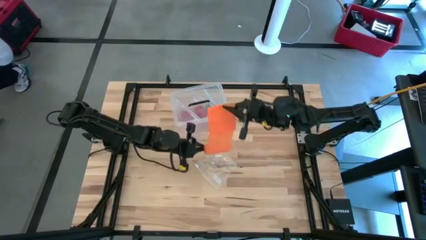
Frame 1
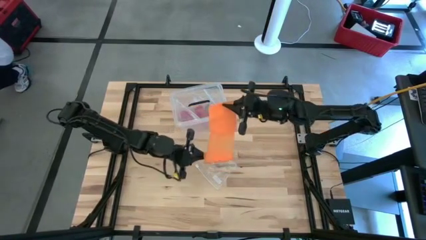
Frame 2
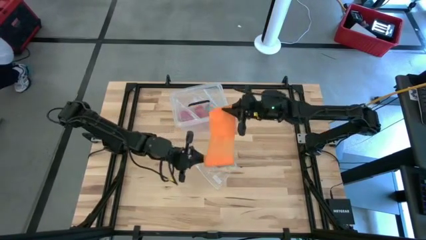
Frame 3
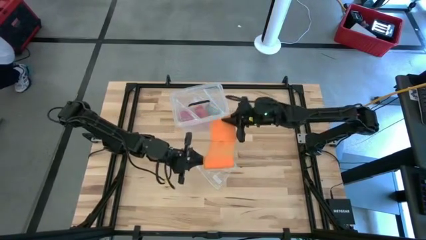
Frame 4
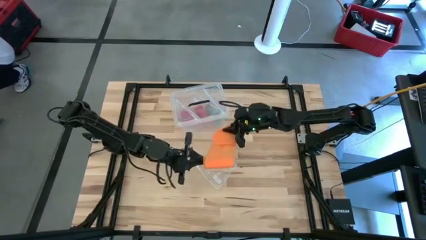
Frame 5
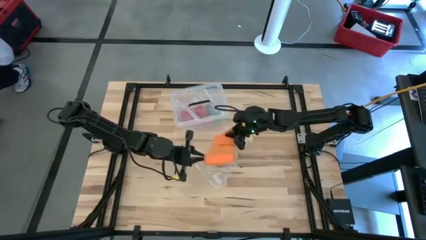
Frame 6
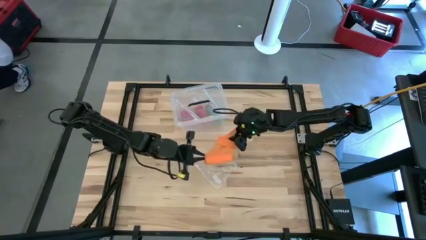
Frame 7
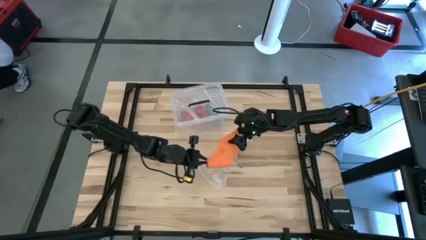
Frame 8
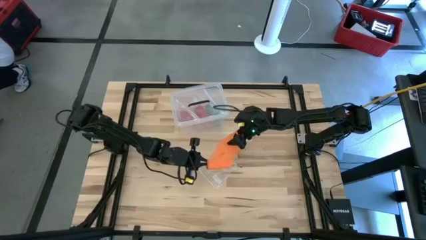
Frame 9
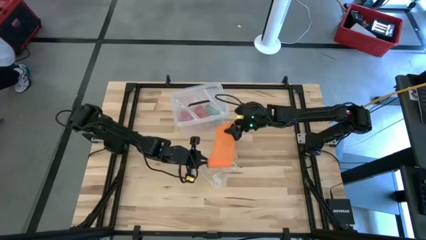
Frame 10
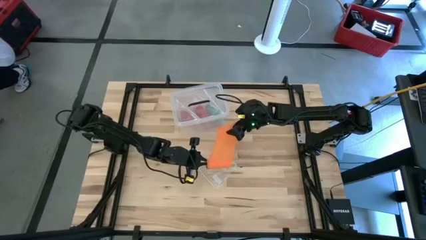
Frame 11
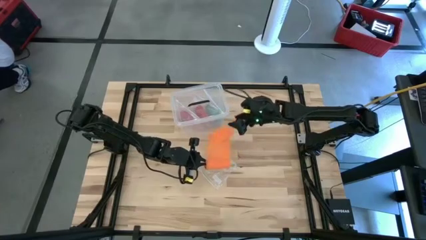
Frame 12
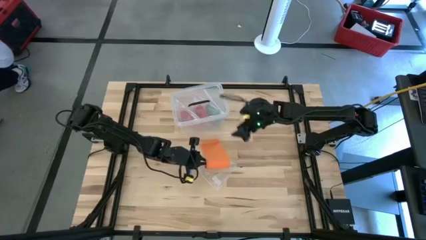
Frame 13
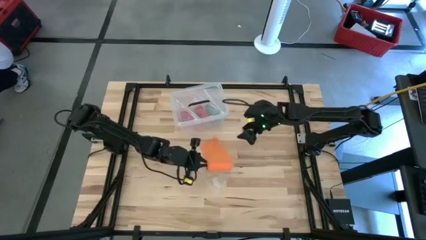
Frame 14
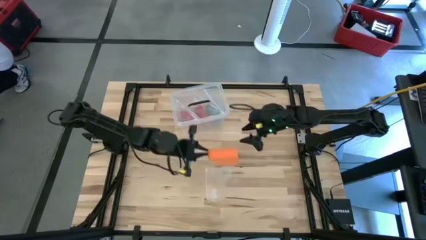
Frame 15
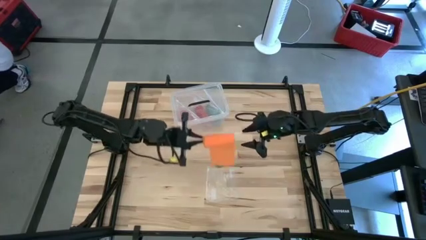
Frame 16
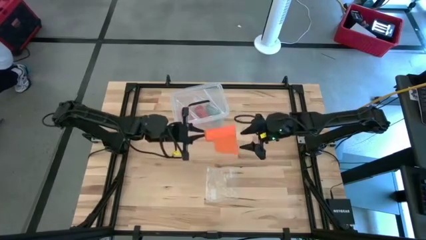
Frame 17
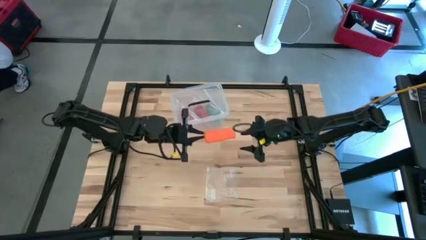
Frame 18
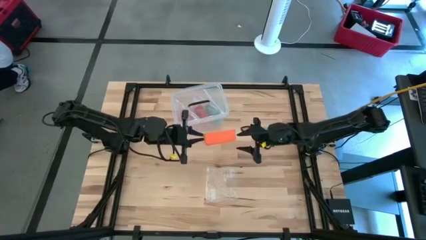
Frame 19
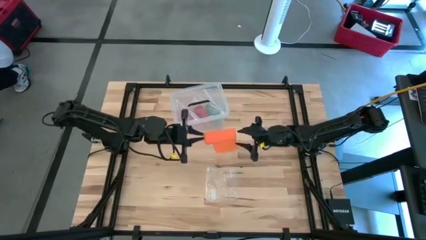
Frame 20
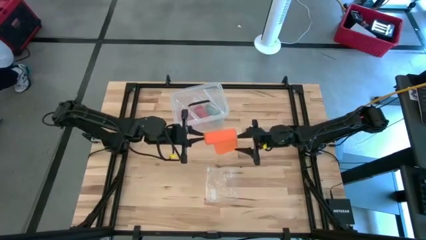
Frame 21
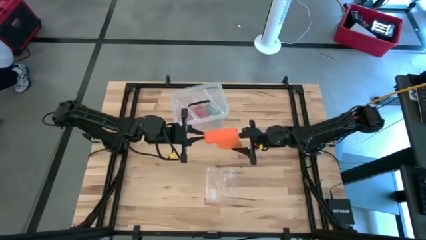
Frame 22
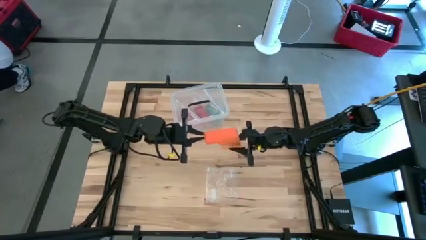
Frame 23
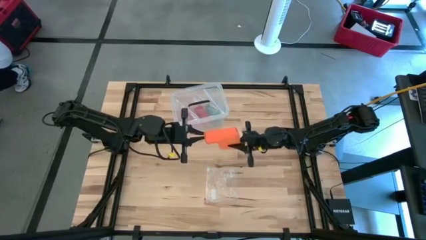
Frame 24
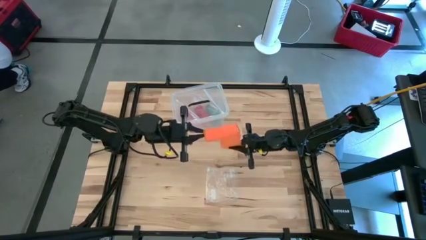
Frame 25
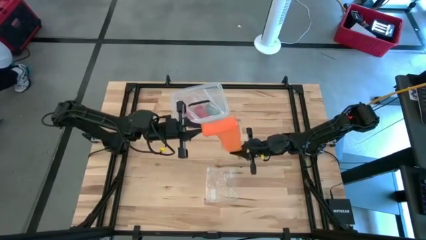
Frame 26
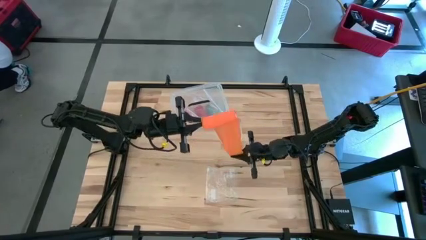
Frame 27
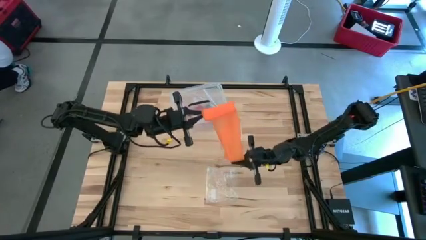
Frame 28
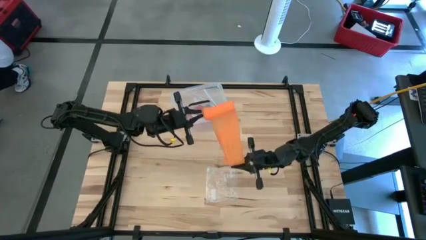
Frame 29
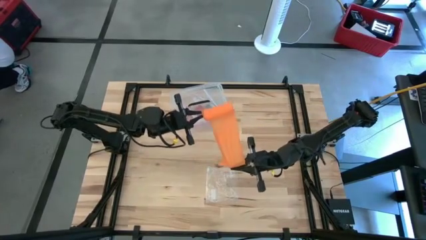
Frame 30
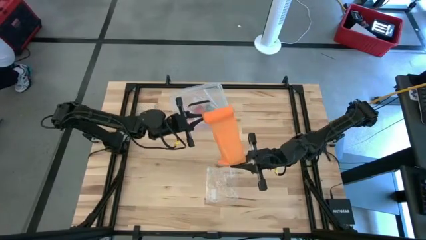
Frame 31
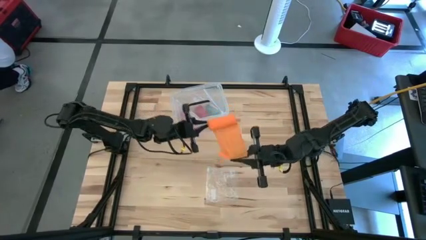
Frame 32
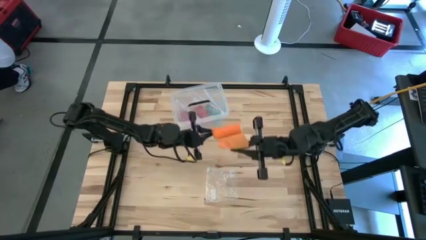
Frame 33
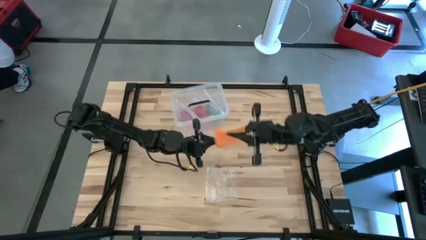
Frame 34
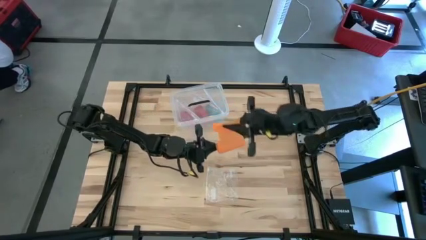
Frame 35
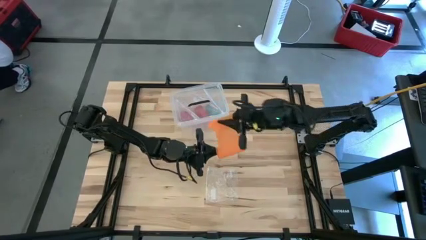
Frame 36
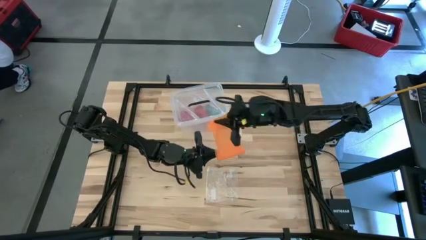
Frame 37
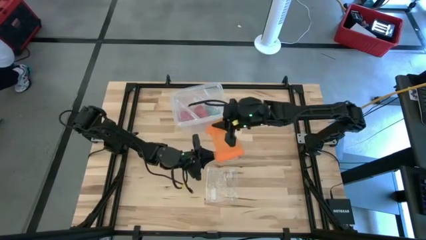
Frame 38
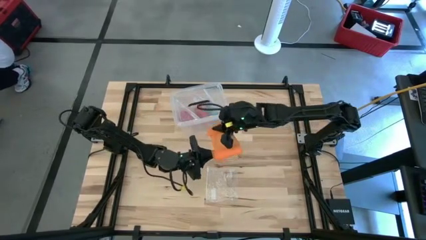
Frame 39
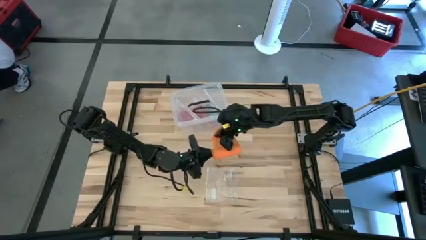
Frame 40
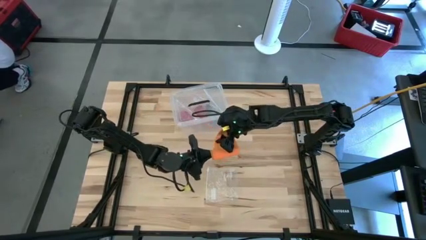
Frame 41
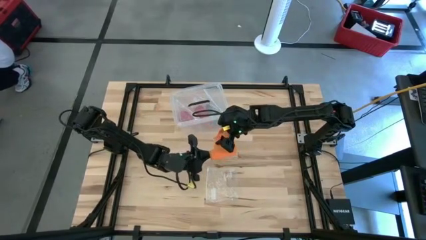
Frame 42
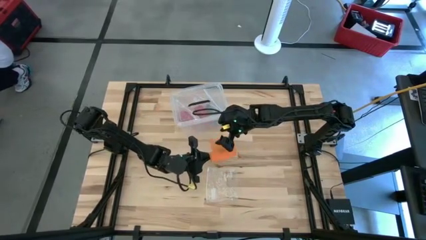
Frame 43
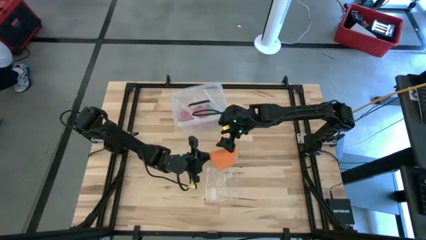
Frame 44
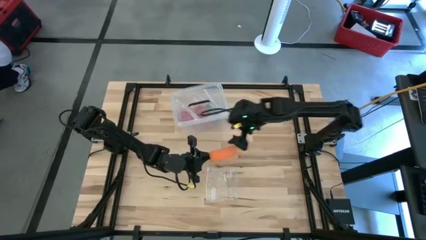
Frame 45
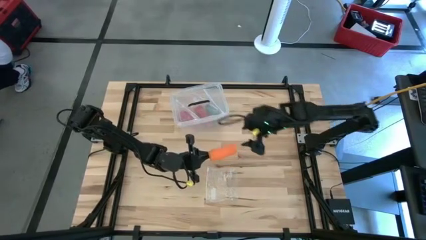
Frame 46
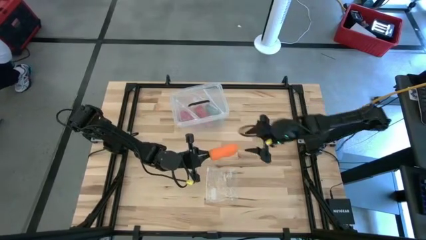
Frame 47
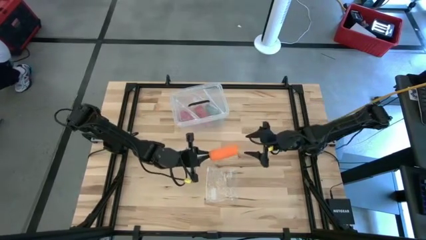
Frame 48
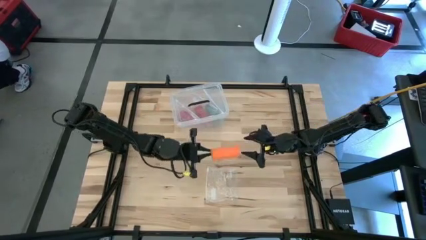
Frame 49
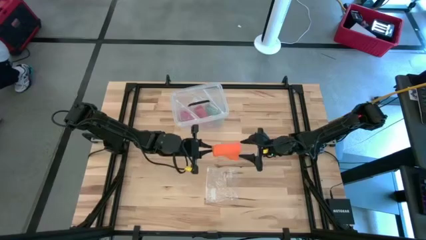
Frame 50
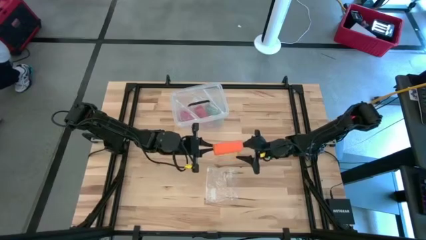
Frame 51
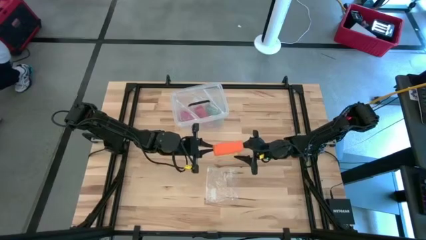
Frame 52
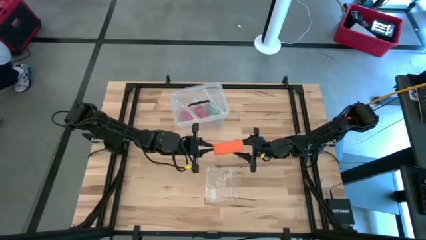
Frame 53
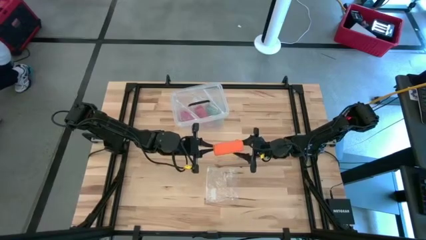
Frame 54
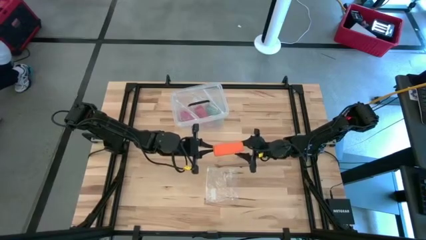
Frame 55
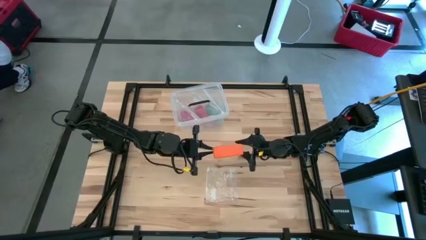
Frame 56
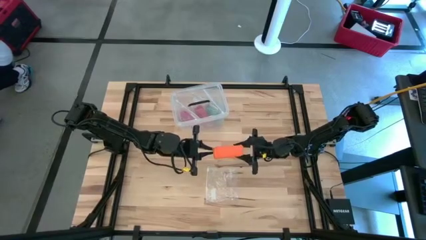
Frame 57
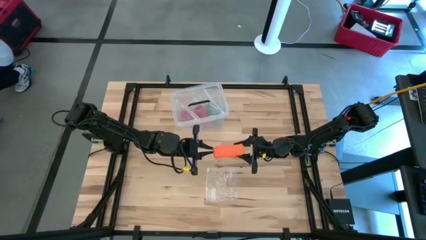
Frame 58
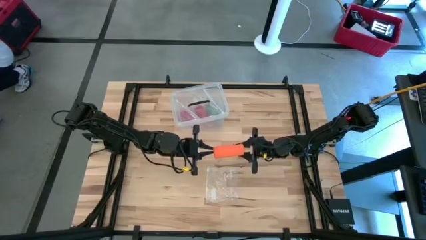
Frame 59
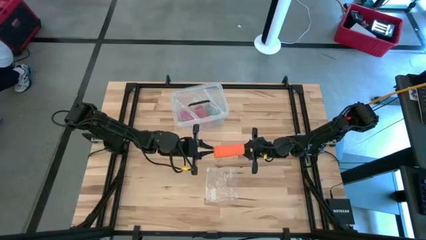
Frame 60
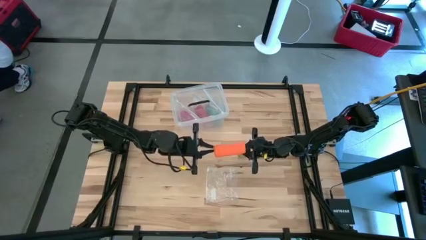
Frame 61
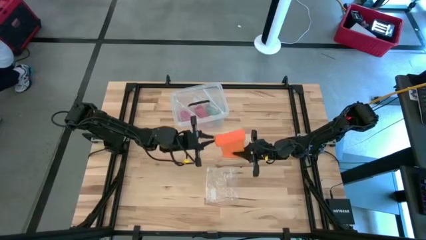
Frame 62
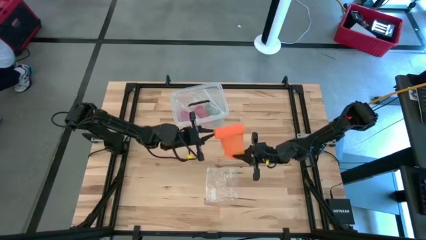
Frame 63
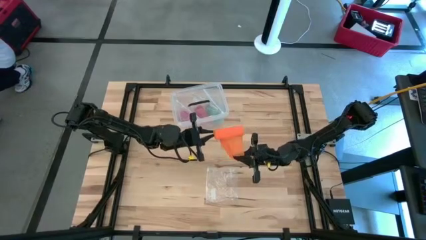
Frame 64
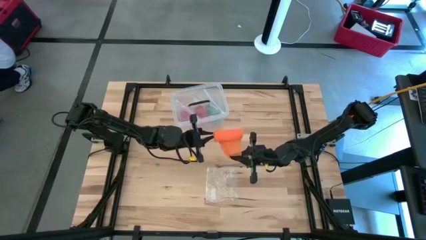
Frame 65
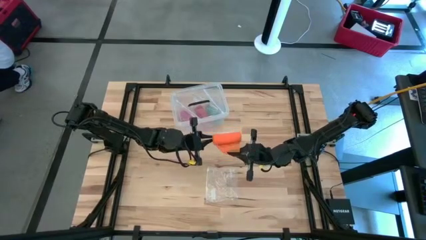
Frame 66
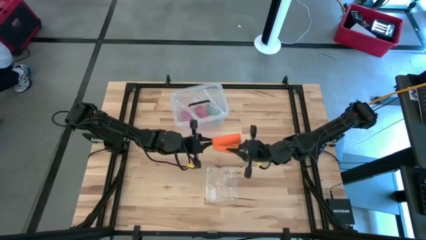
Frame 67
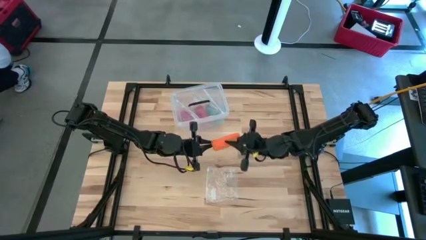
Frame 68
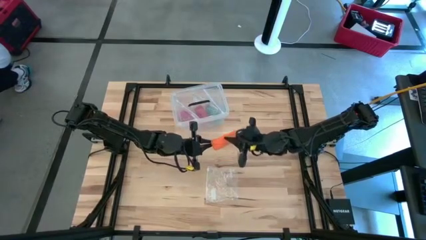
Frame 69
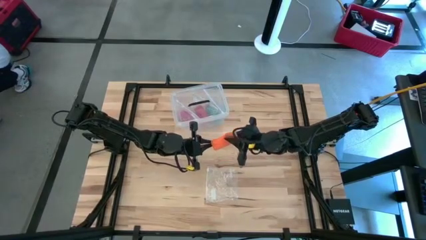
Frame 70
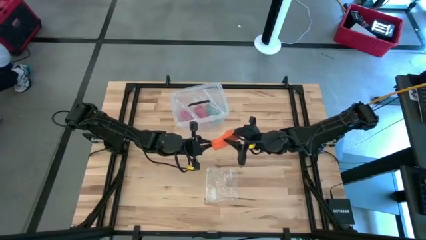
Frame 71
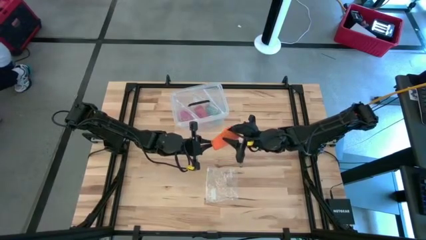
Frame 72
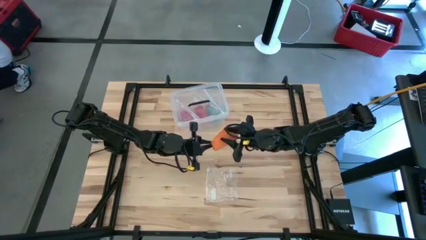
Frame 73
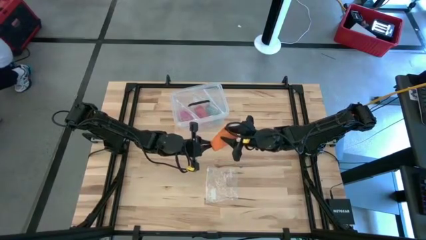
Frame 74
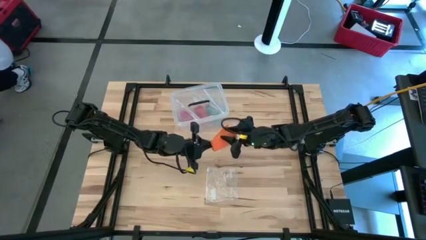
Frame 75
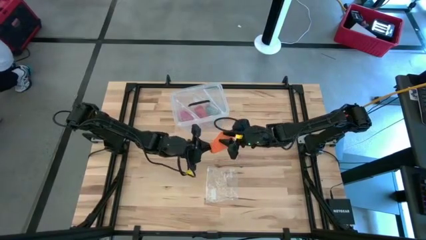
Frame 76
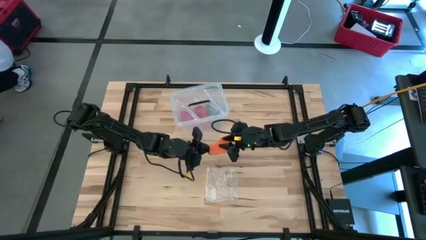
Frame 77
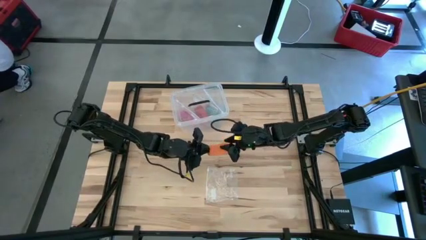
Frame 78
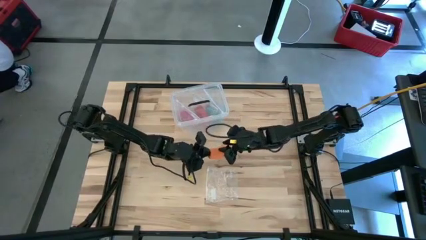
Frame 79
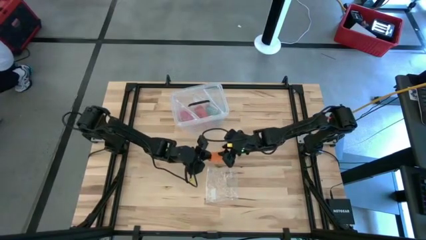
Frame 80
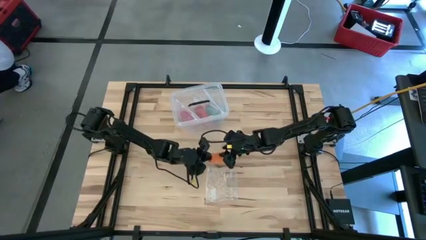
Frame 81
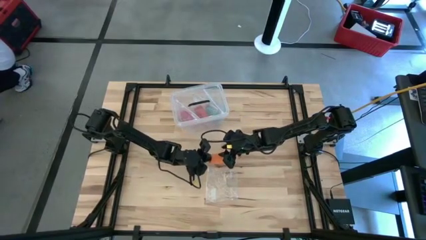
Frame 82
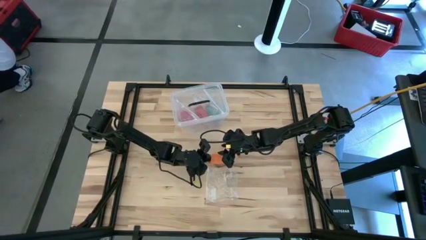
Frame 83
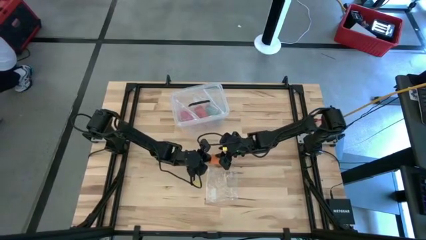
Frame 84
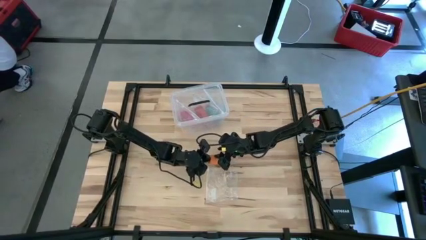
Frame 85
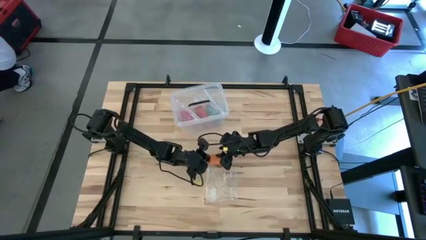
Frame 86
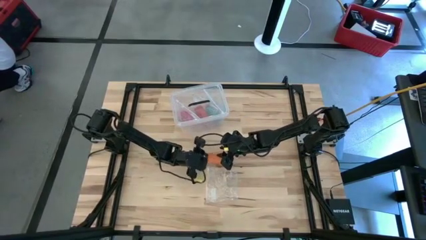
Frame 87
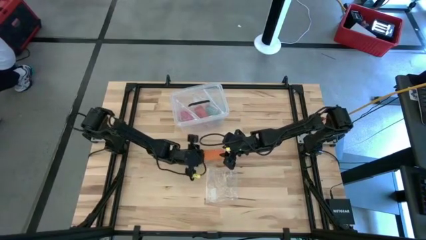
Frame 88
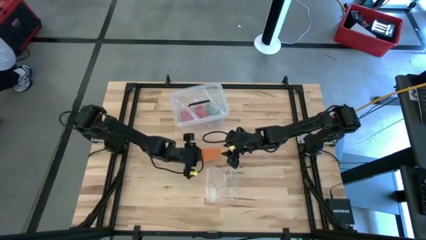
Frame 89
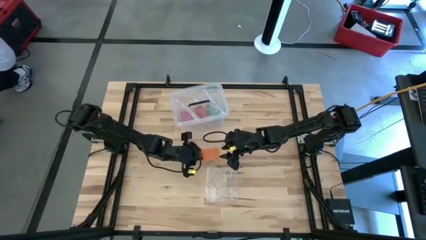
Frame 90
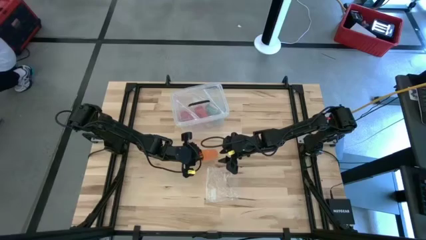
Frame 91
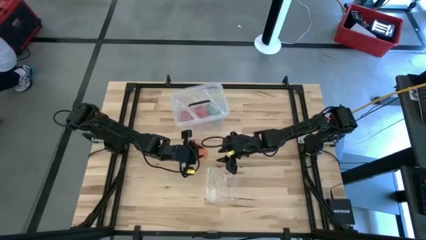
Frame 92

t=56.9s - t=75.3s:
Task: Roll bandage
Roll the orange bandage
